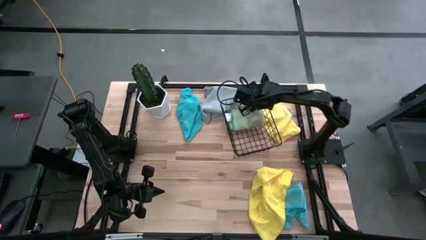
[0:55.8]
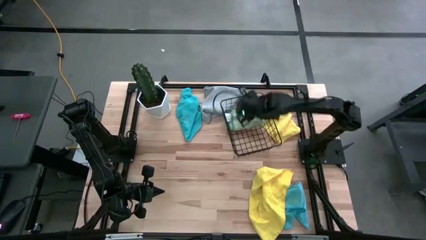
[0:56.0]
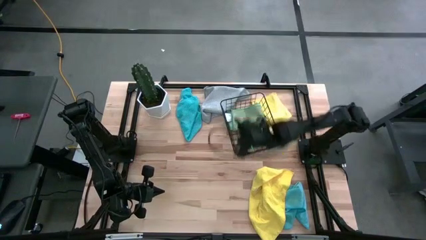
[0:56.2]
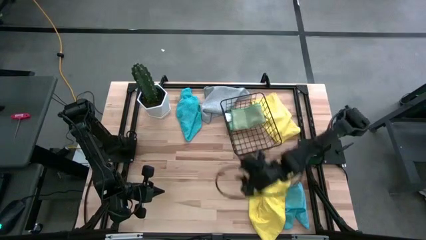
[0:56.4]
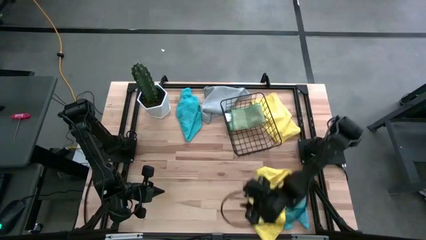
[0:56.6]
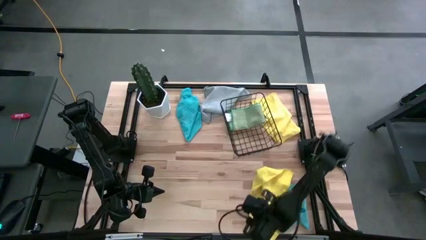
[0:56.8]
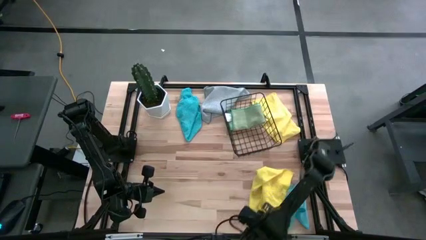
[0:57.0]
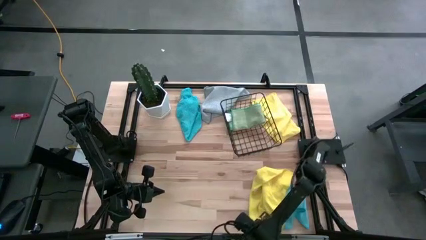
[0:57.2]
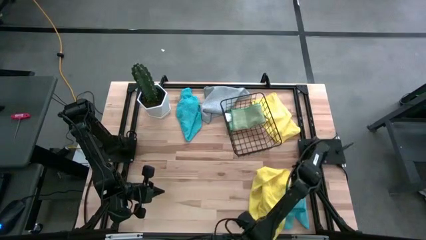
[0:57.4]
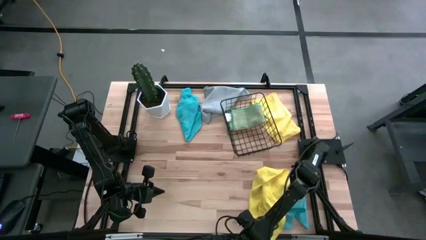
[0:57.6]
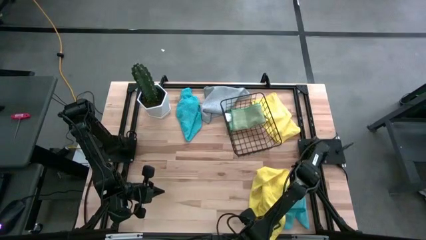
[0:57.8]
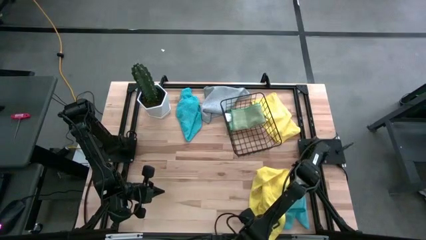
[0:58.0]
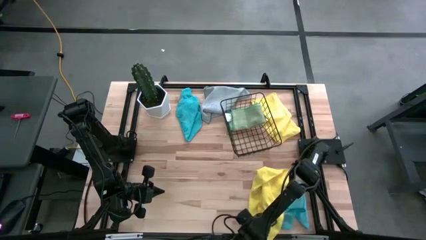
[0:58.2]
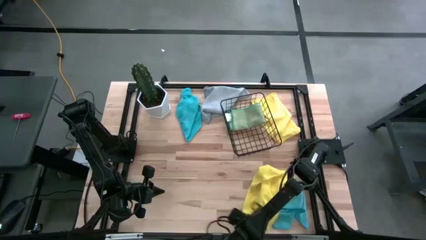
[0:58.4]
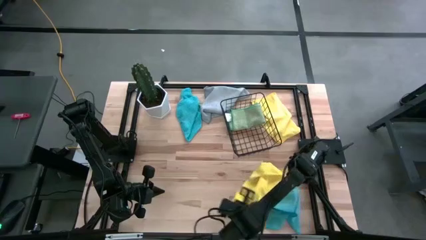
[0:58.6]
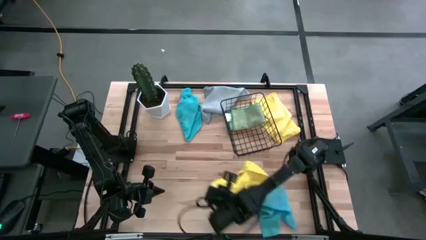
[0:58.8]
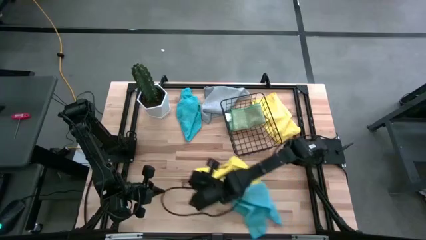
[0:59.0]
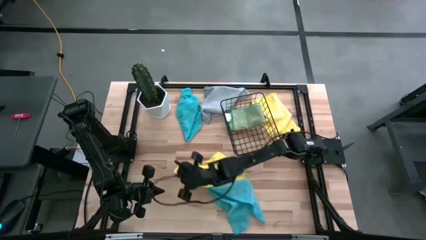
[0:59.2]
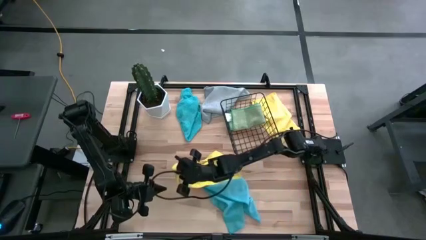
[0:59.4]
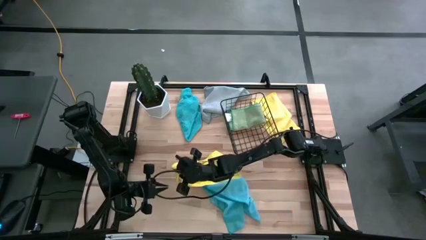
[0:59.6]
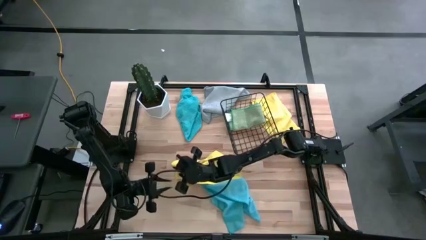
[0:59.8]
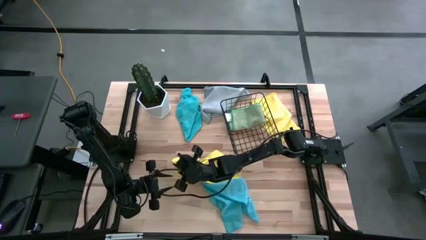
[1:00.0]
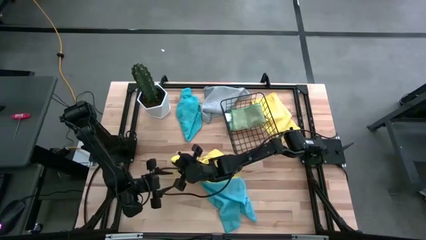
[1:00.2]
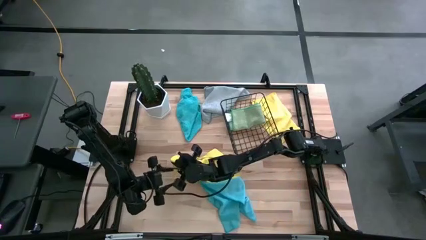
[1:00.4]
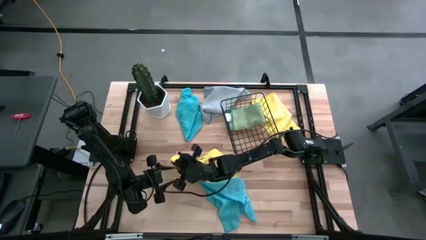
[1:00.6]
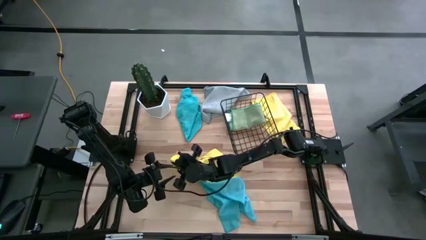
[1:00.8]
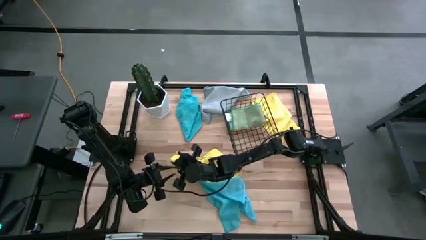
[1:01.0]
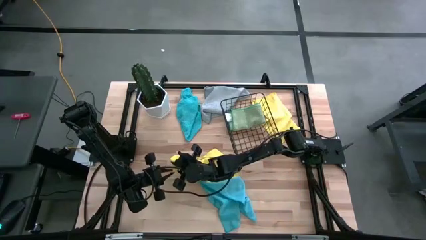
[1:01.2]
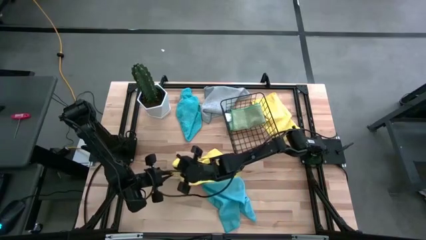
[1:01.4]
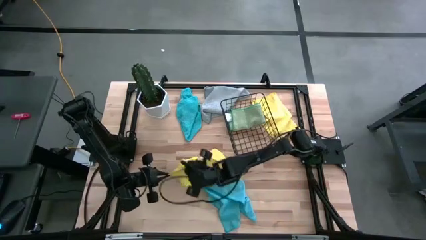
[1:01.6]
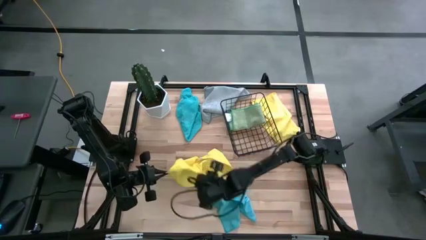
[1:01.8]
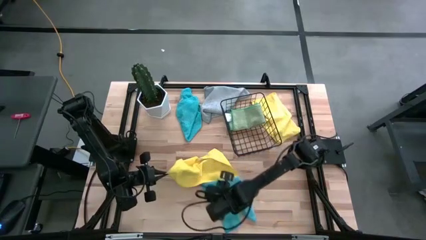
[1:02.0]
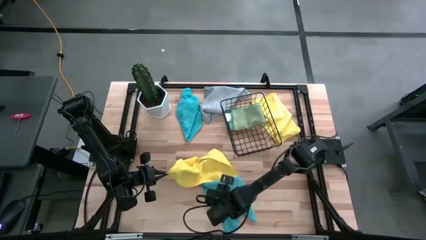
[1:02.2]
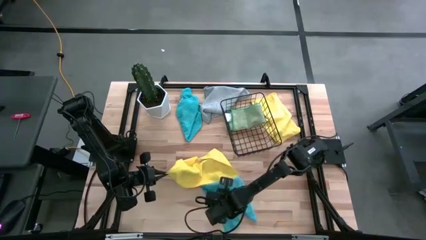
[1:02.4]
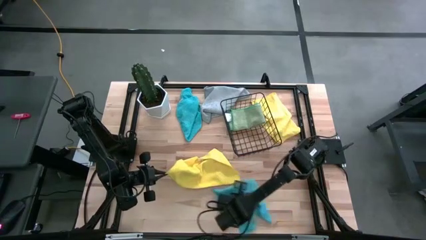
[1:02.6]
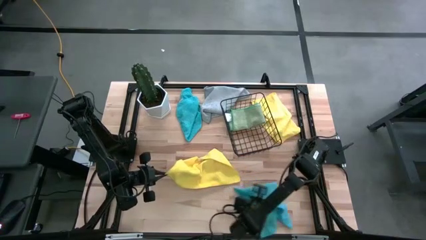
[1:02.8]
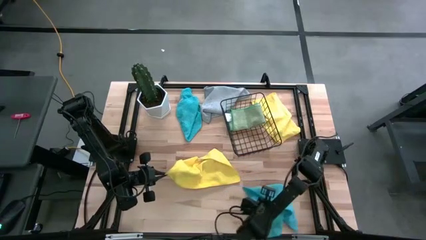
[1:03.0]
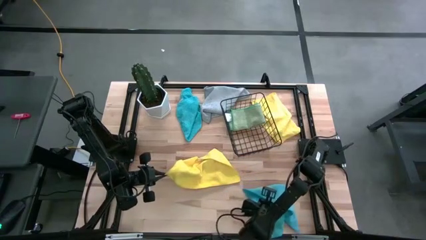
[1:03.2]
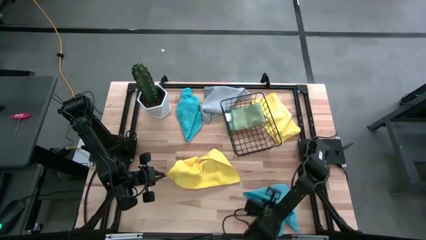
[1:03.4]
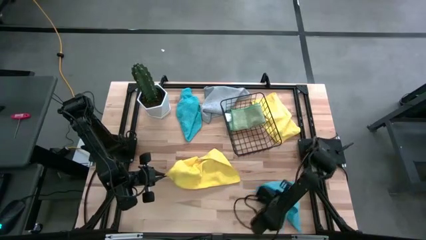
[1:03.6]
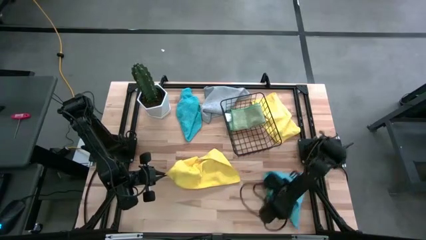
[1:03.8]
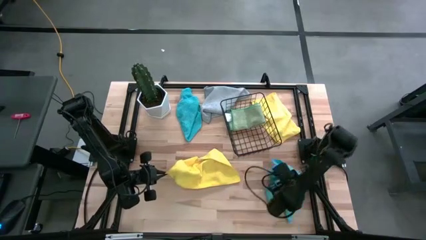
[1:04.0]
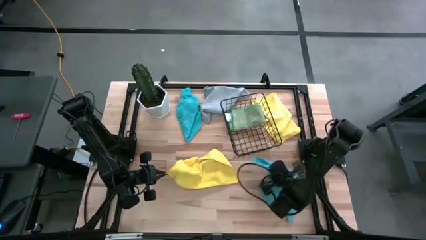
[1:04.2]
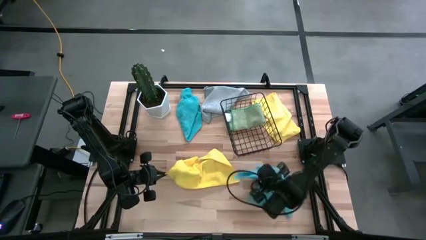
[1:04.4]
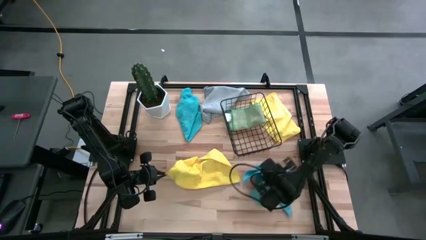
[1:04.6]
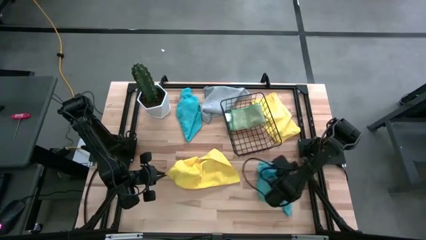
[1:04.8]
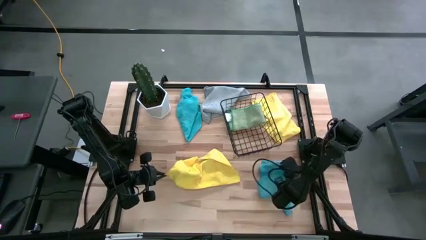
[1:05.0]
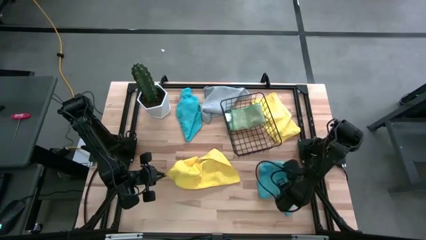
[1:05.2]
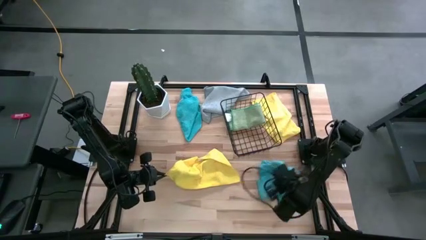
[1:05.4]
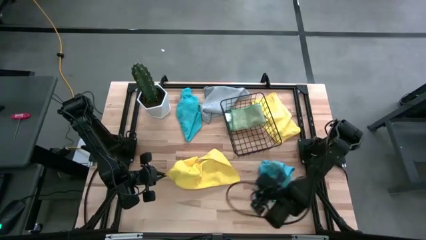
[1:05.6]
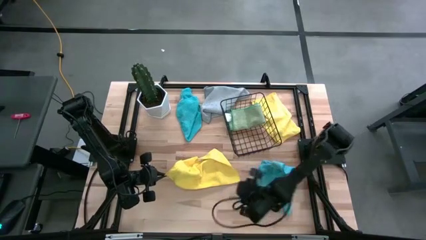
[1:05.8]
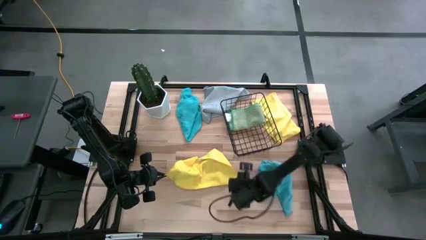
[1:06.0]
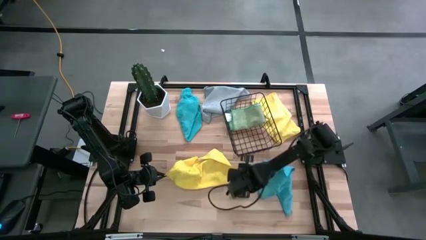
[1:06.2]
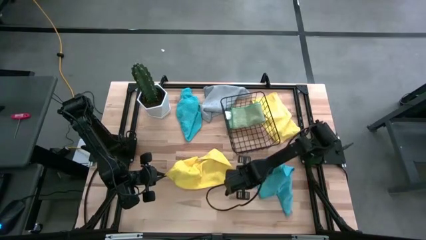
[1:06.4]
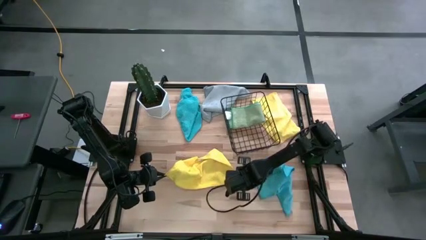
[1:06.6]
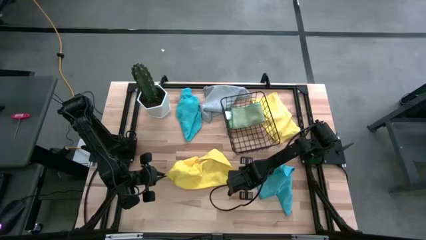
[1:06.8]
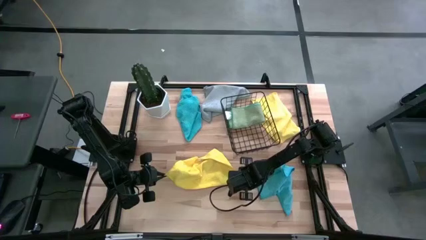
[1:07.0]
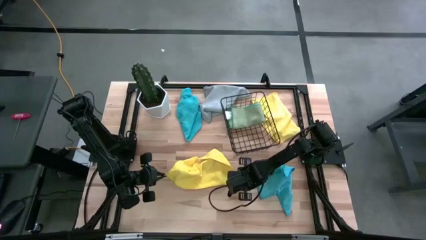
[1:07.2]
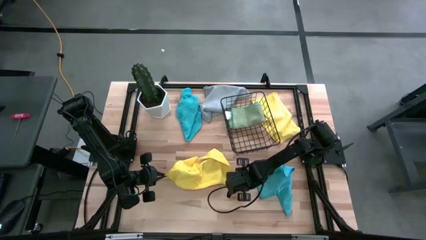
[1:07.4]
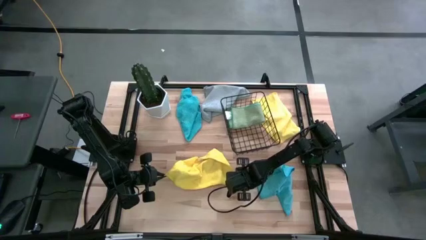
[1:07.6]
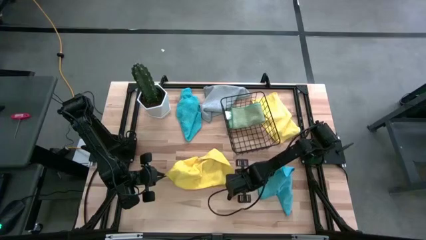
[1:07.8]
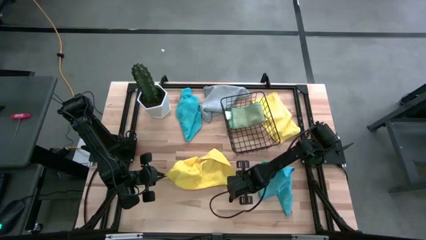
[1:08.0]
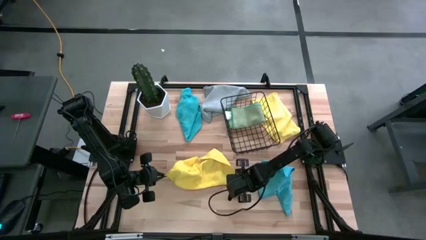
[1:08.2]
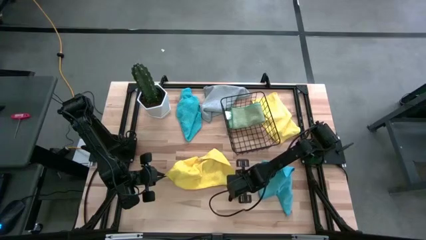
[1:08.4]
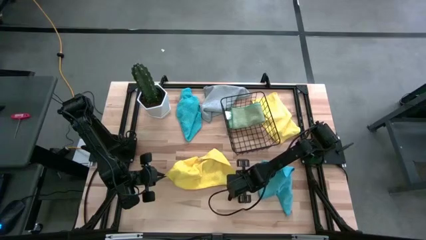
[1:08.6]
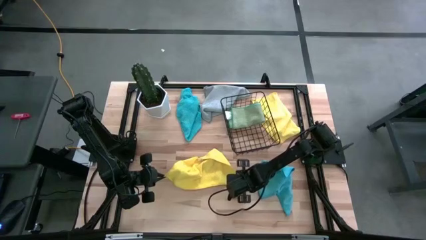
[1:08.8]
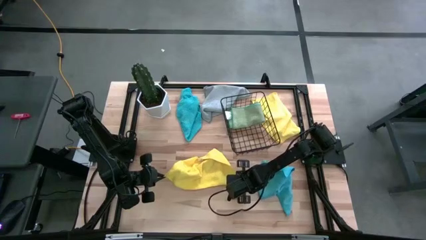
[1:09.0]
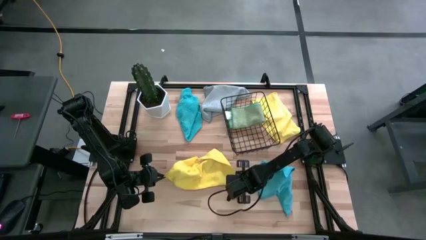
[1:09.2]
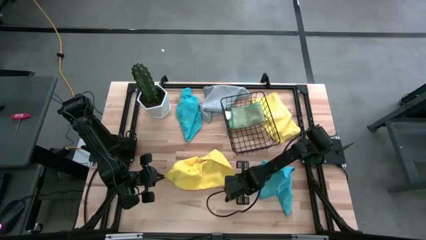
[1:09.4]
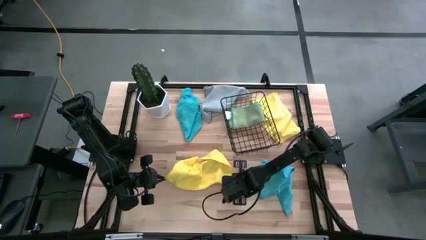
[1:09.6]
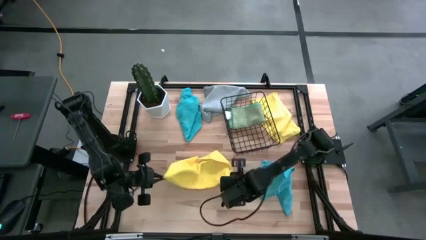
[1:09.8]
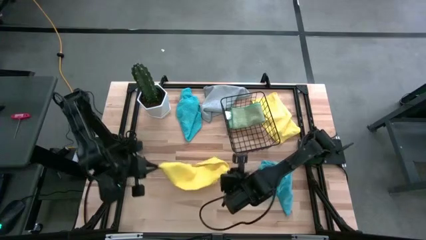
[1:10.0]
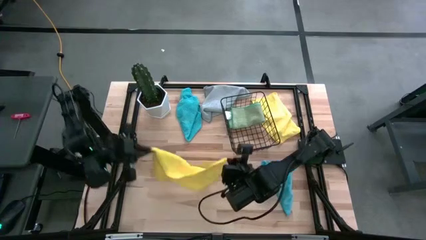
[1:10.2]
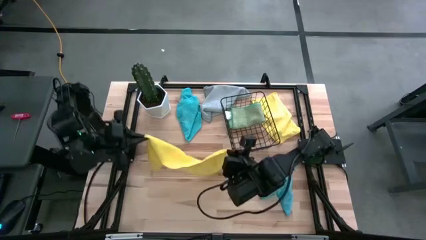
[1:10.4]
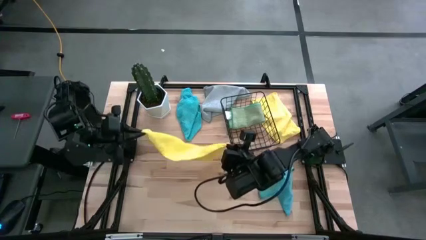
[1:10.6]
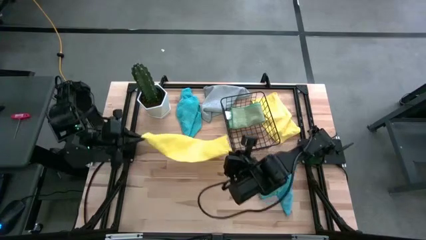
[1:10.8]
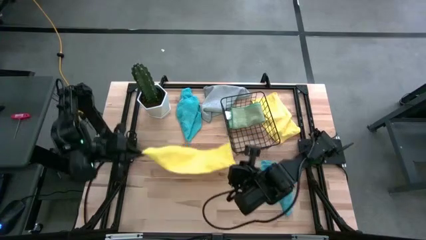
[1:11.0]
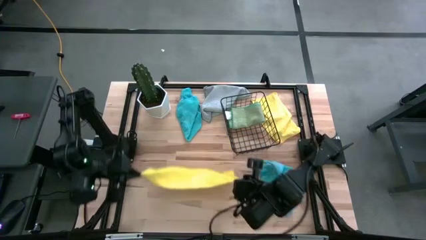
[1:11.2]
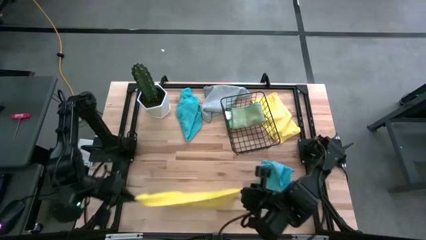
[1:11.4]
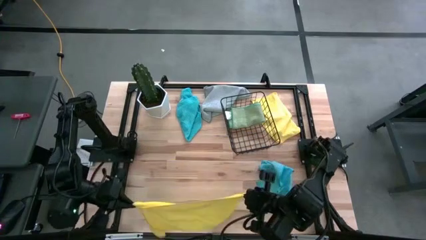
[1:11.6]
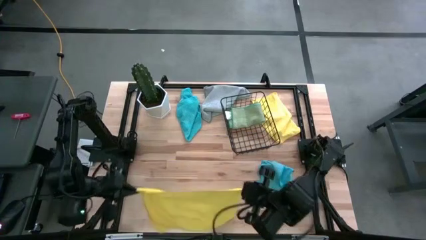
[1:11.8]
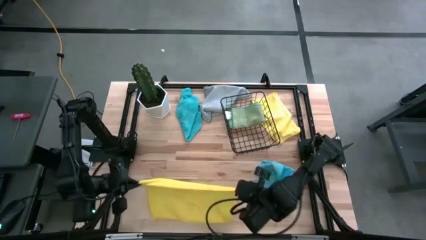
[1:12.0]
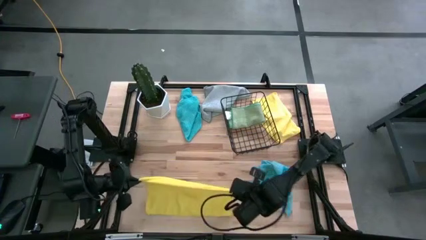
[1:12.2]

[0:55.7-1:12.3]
Task: Fold microfiber towels
Fold the bottom yellow microfiber towel
